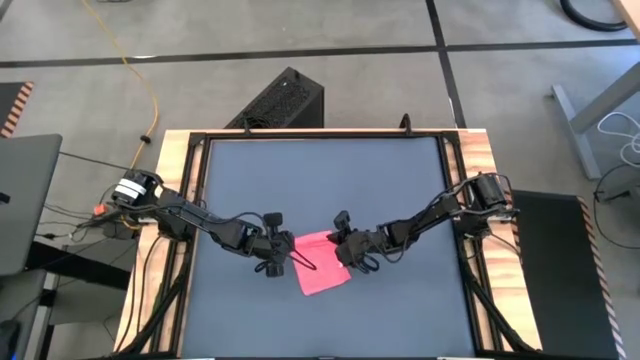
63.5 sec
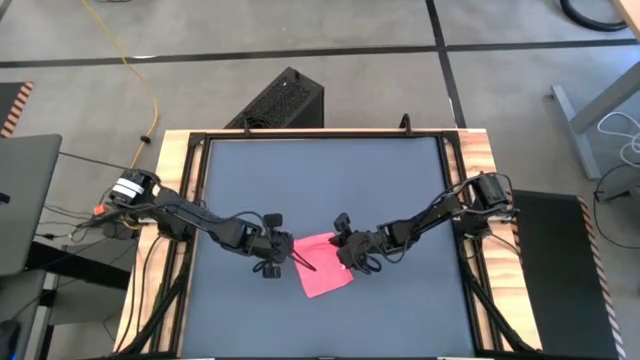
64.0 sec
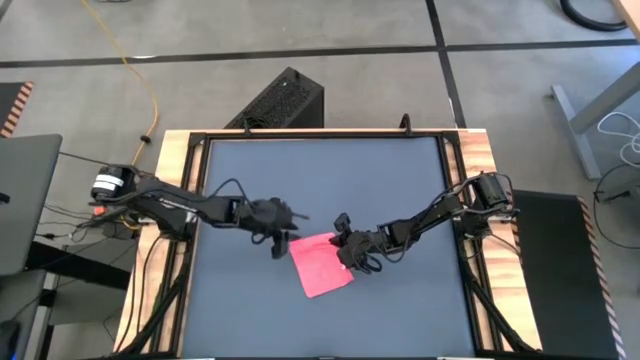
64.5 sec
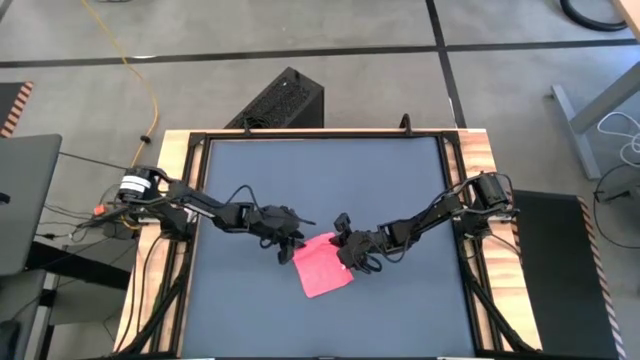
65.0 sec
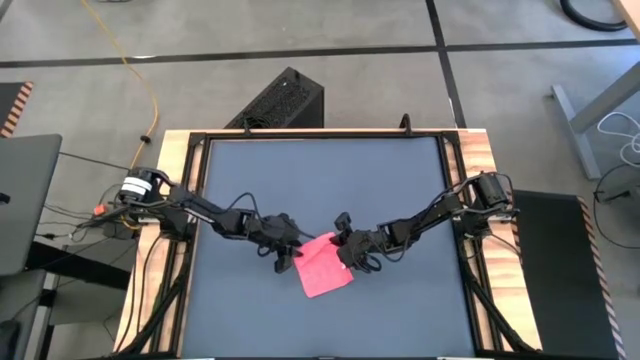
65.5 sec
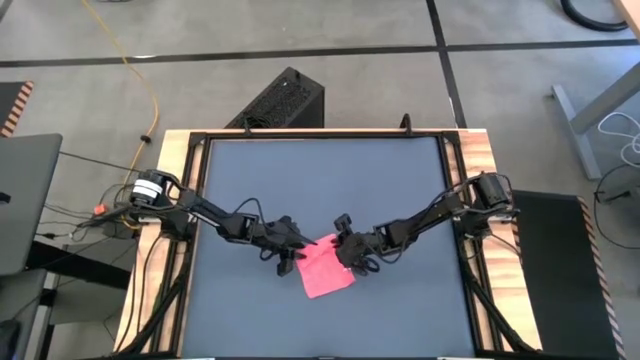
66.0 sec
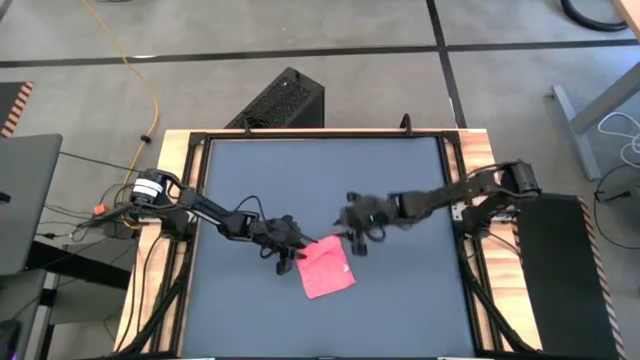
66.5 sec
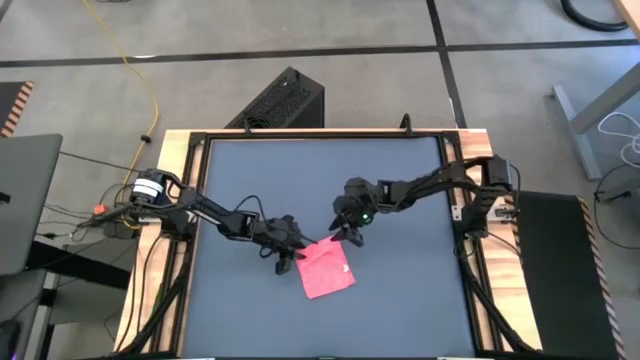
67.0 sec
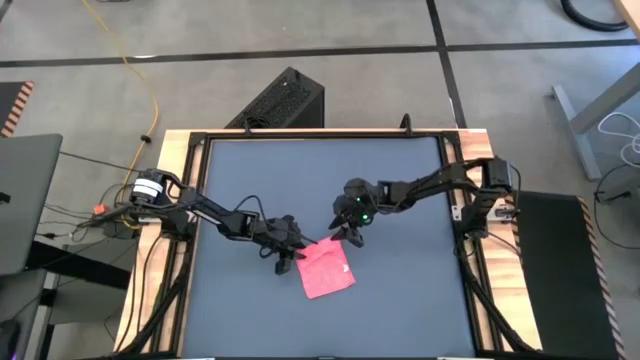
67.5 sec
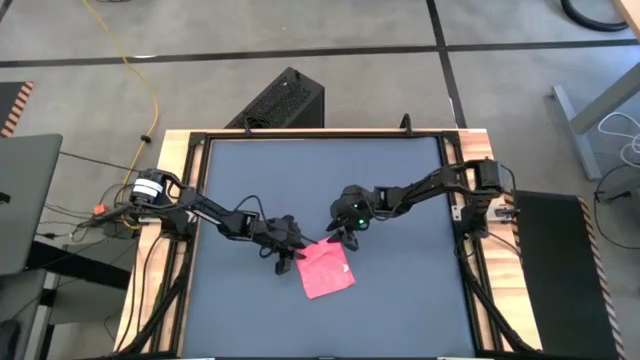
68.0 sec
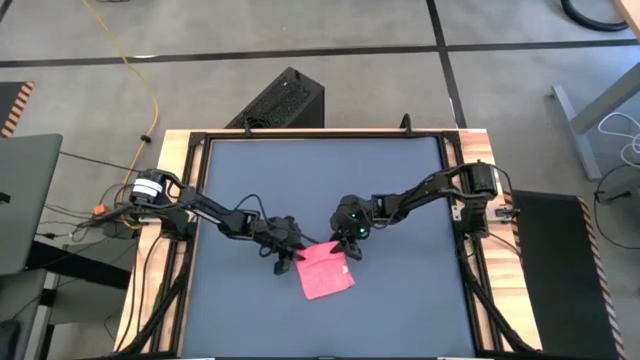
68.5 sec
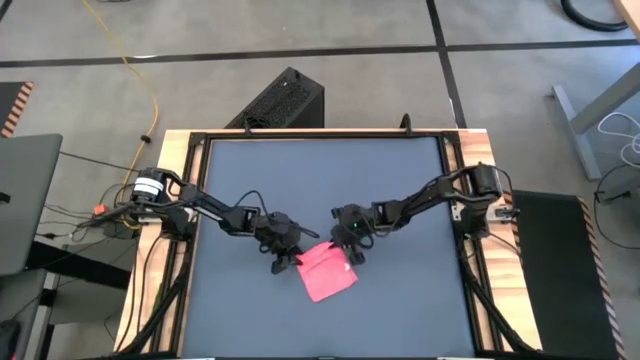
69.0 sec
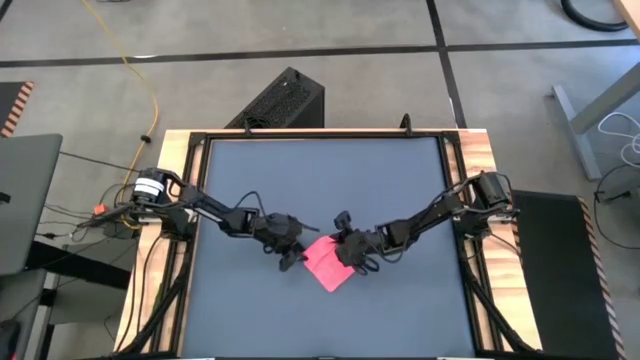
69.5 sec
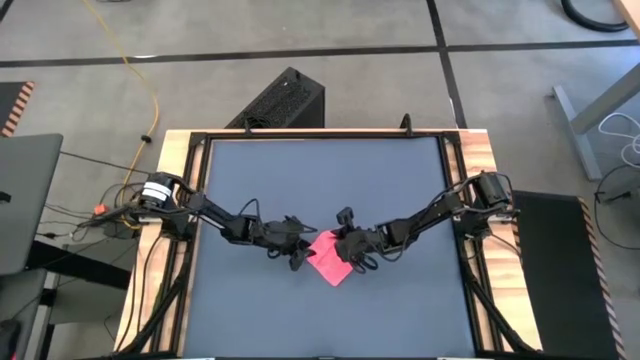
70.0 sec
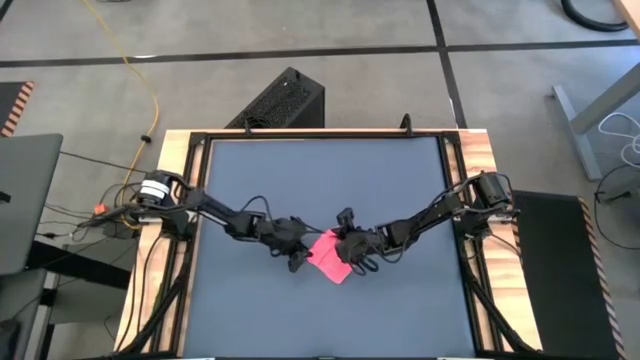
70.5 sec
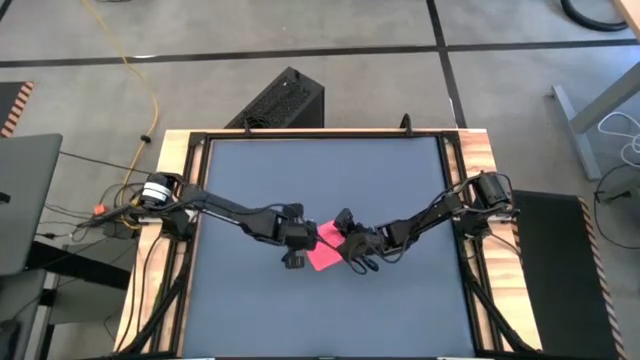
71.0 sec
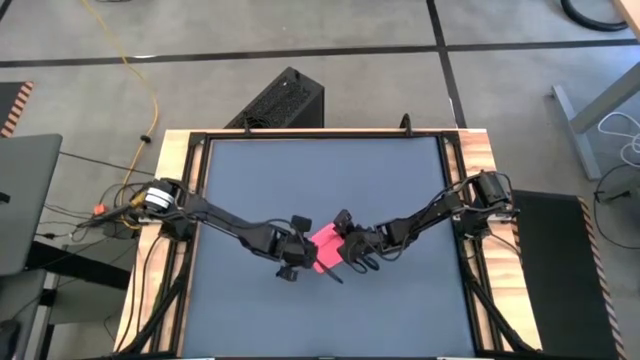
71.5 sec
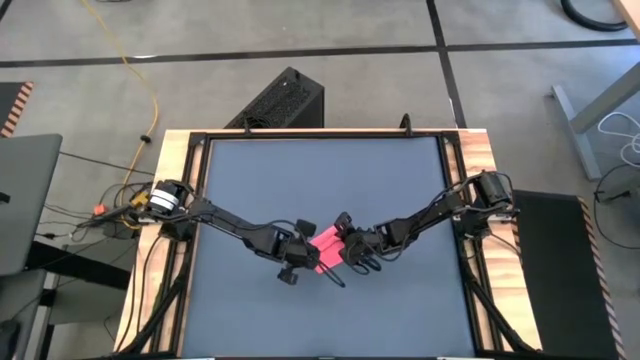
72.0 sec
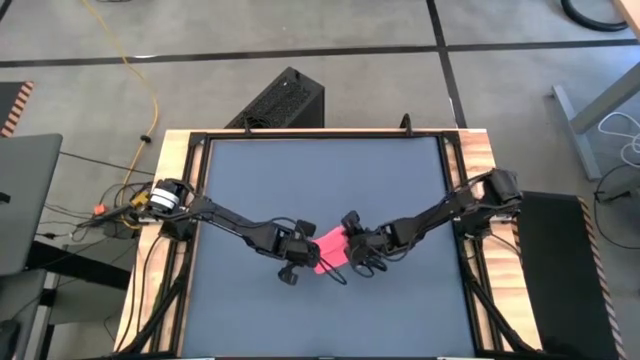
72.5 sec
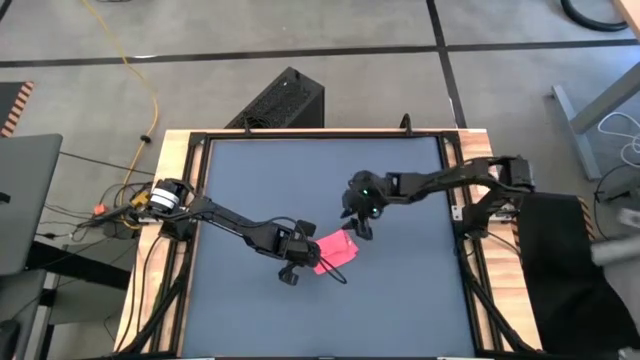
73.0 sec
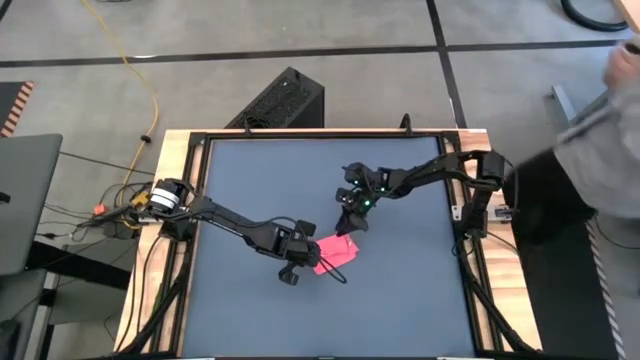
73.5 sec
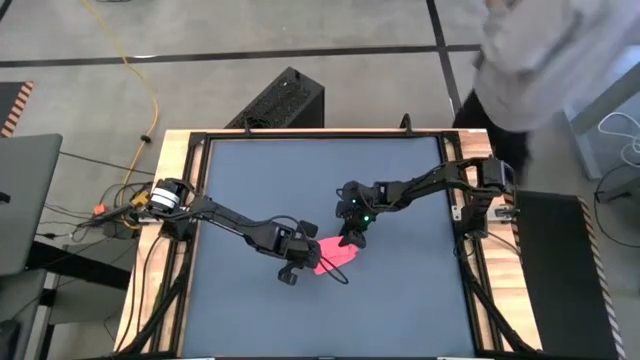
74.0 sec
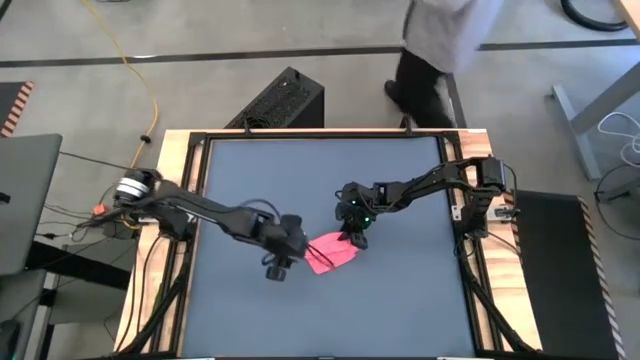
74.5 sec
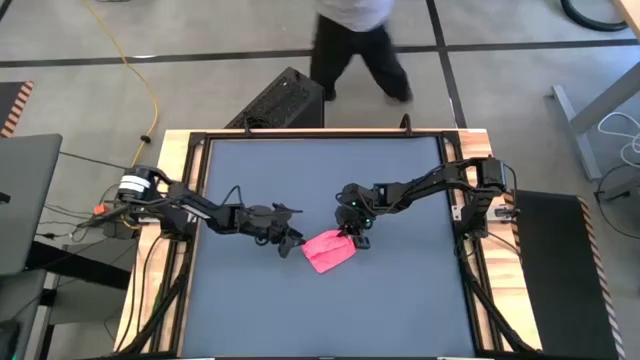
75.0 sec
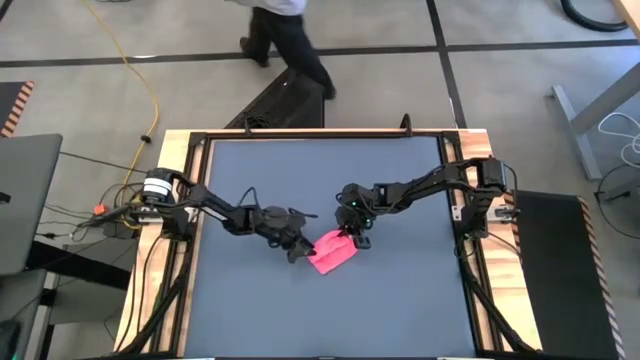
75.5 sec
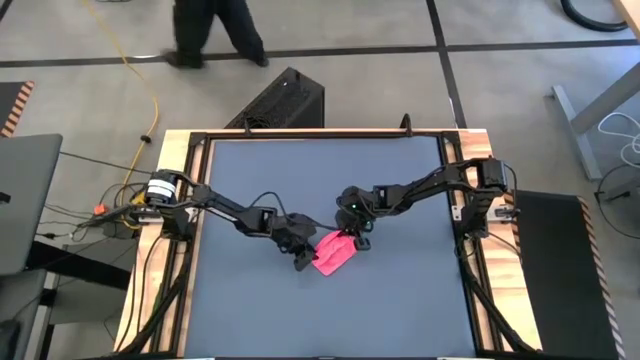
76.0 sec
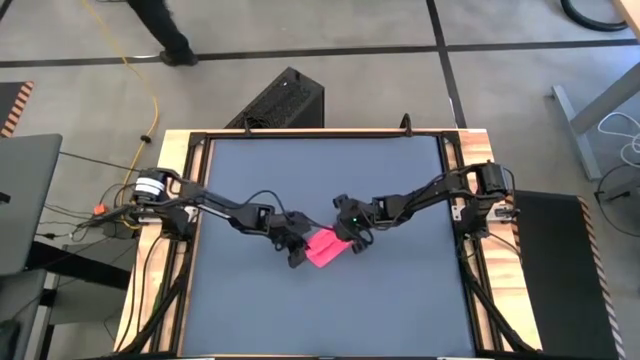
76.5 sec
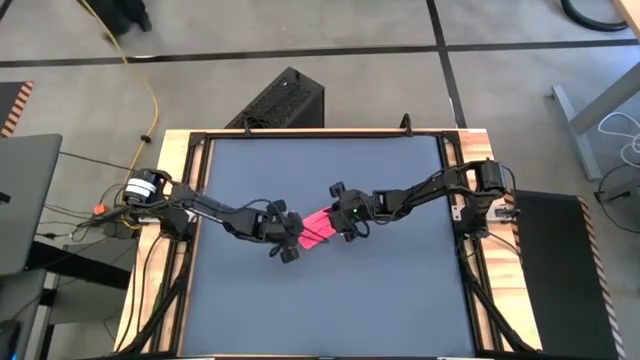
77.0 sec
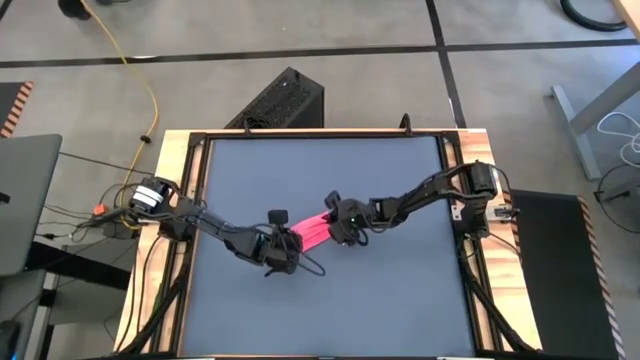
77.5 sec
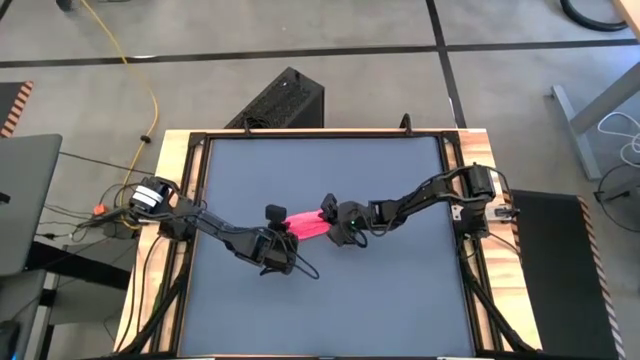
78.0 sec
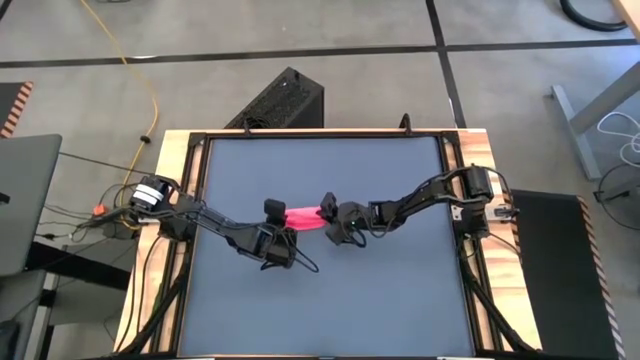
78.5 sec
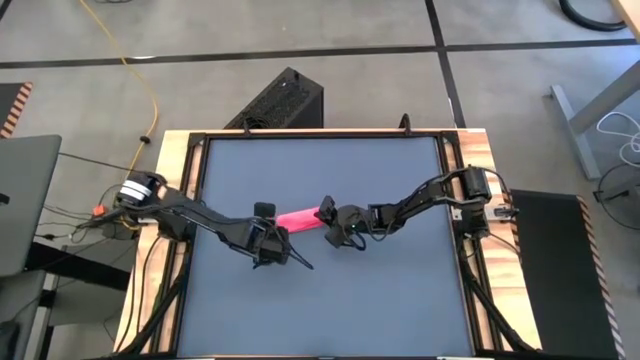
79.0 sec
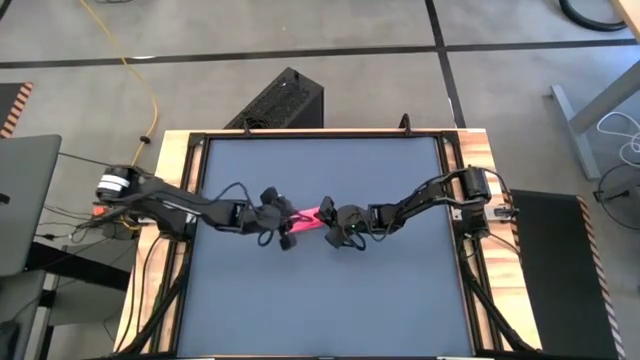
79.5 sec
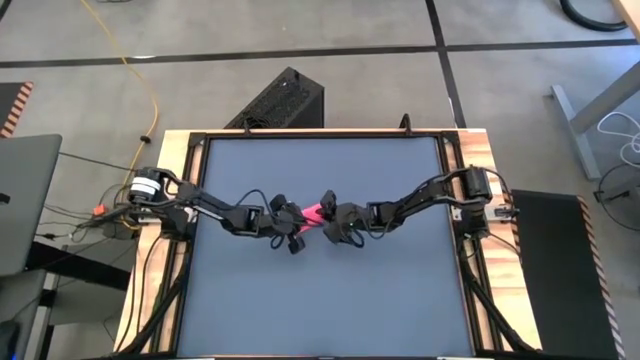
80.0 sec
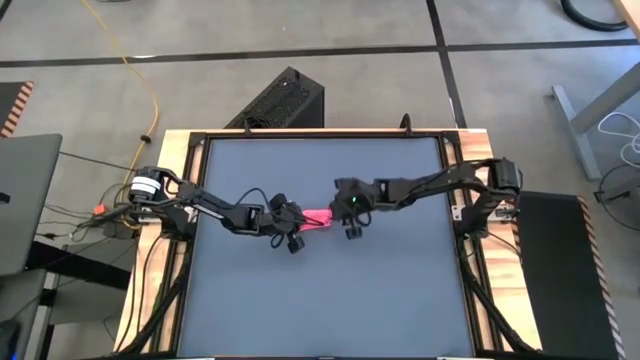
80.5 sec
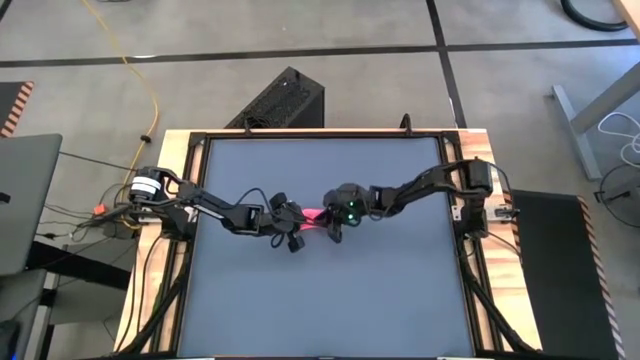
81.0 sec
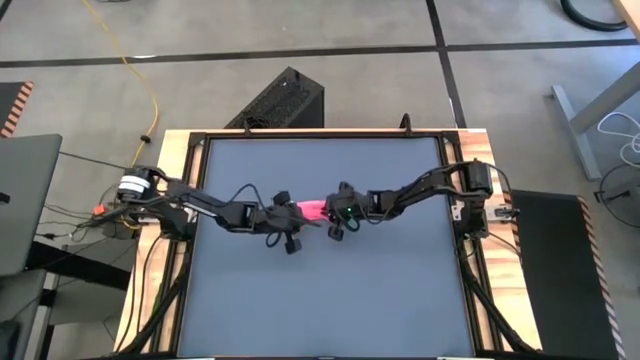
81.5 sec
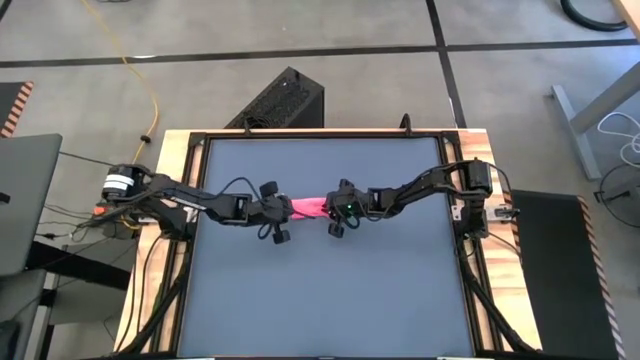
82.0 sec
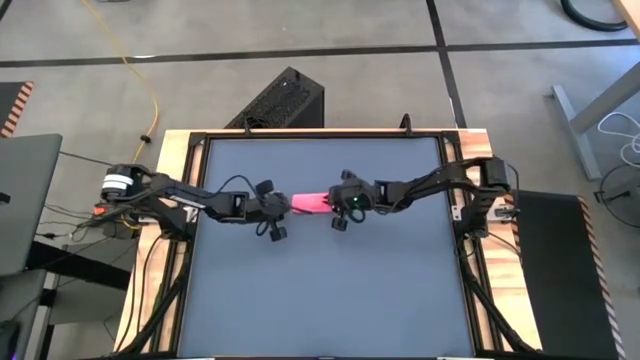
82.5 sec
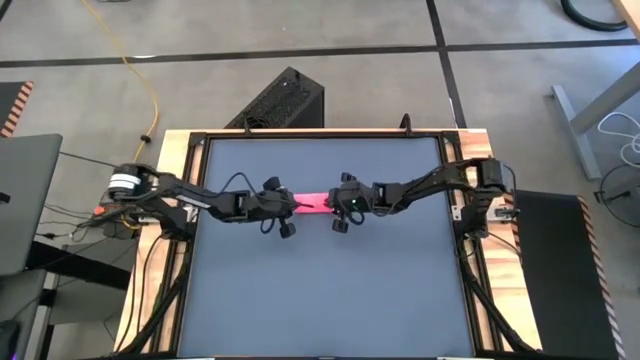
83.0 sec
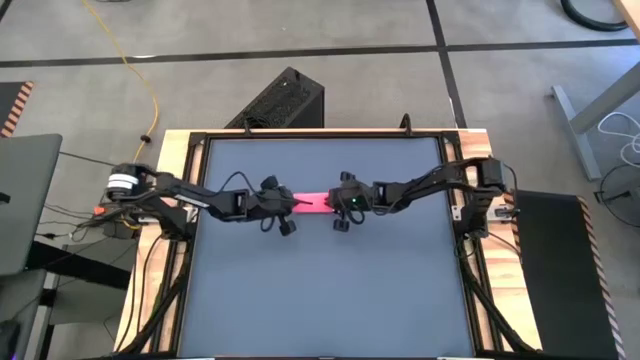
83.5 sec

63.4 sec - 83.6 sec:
Task: Roll towel
Roll the light red towel
